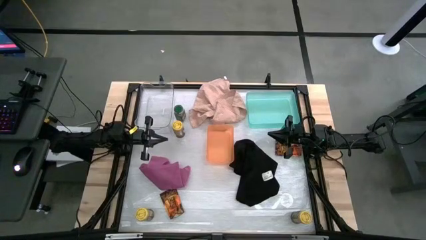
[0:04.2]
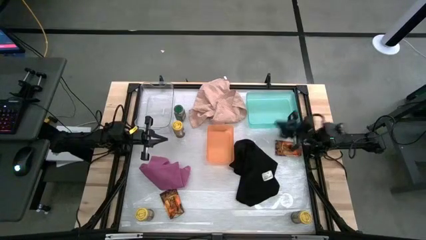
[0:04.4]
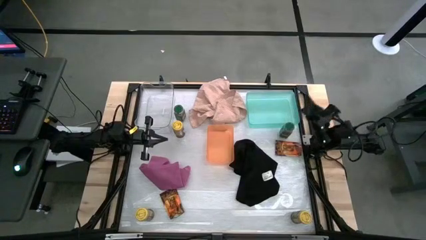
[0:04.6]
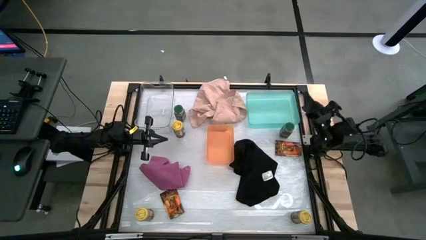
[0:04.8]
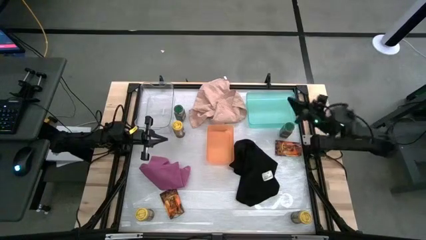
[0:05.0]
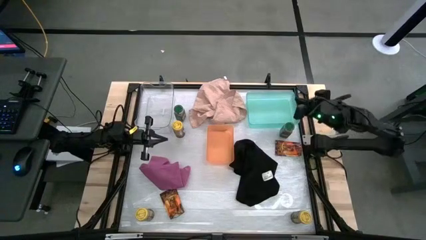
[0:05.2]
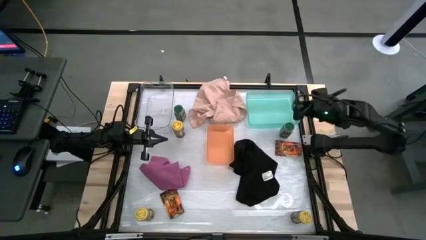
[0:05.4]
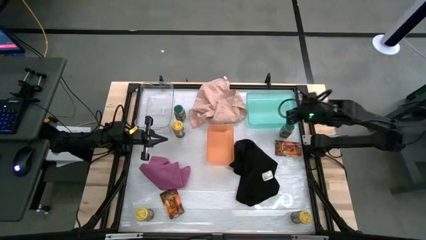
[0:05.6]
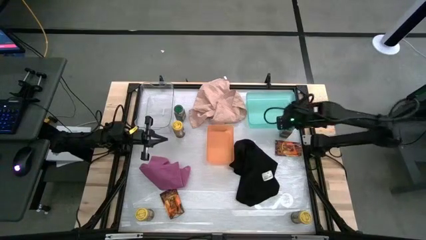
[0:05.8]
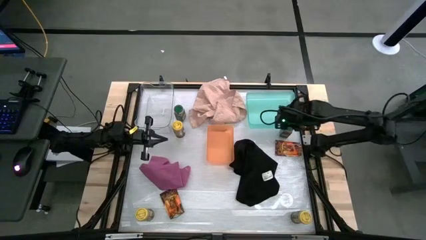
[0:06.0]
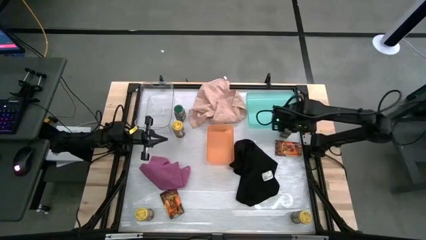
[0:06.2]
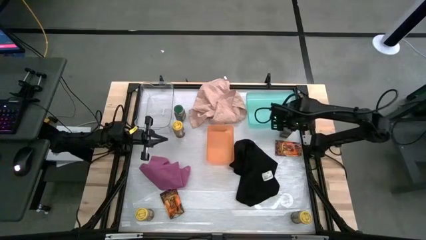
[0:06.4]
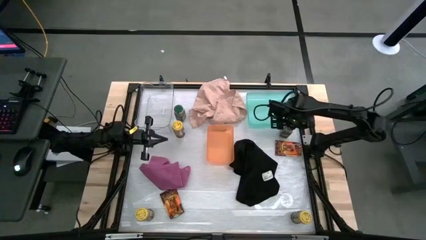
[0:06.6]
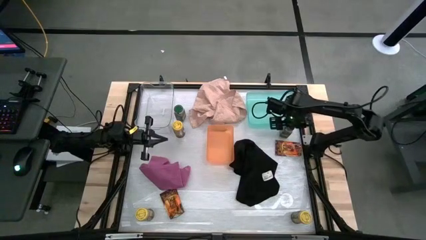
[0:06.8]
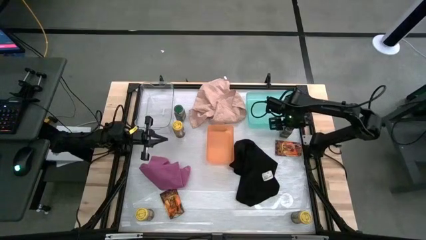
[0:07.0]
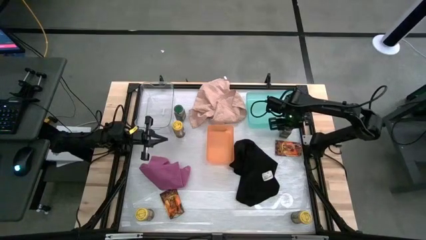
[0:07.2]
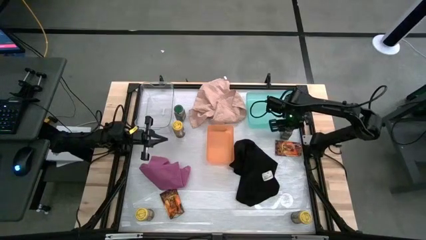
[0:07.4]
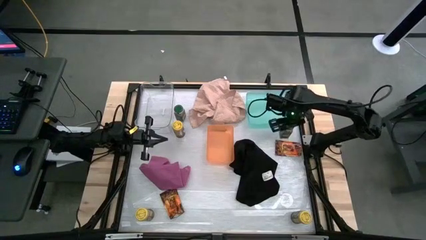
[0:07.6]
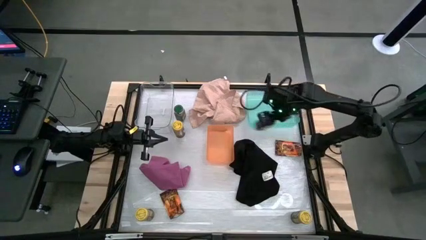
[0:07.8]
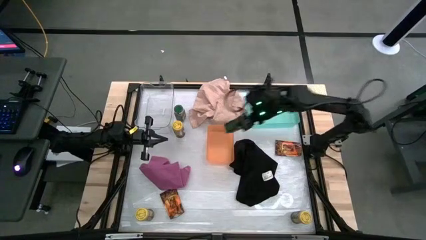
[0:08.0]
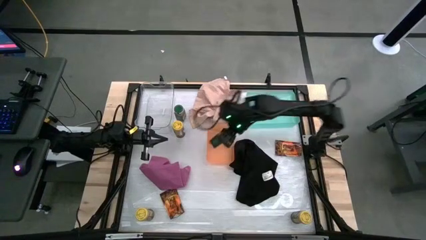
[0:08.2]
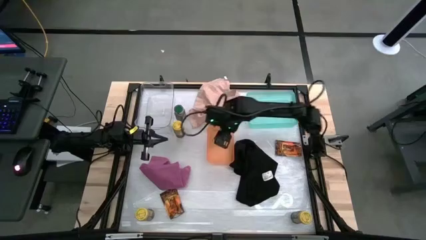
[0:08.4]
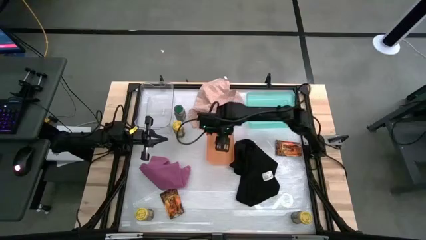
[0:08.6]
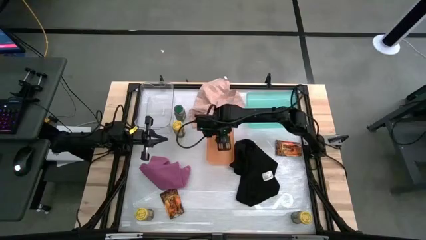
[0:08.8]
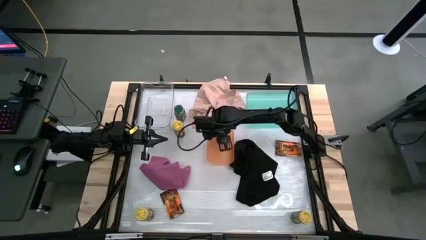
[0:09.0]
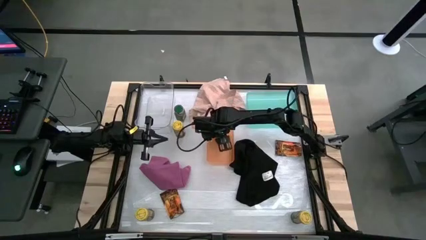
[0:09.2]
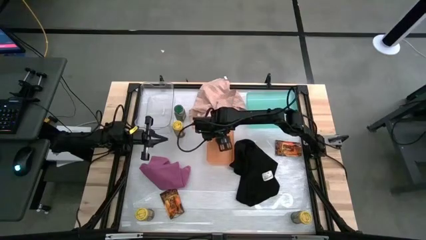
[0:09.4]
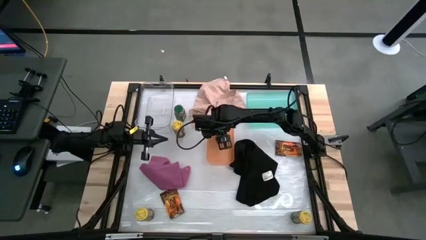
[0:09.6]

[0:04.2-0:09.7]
Task: Sort spices by type
Put the right green seasoning bottle into the orange bin

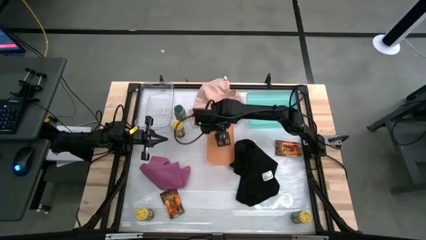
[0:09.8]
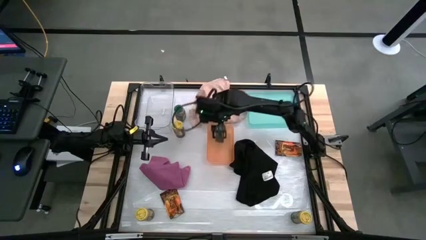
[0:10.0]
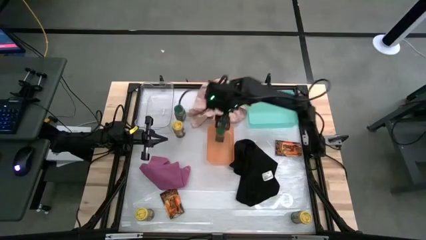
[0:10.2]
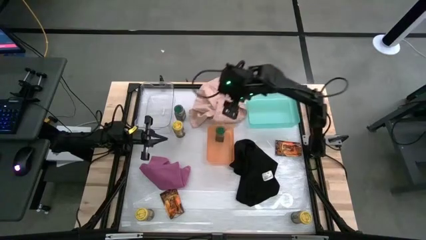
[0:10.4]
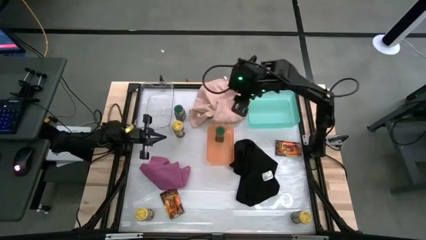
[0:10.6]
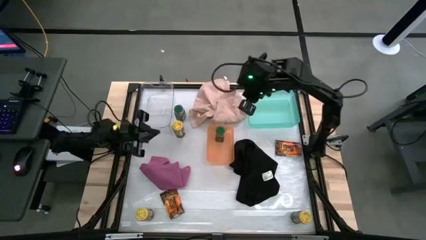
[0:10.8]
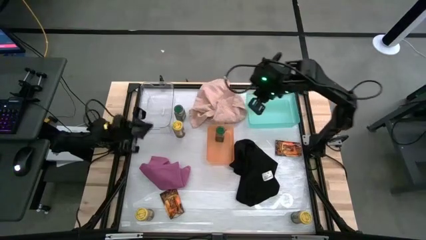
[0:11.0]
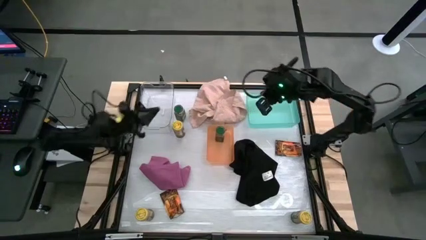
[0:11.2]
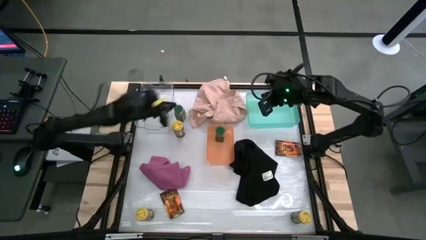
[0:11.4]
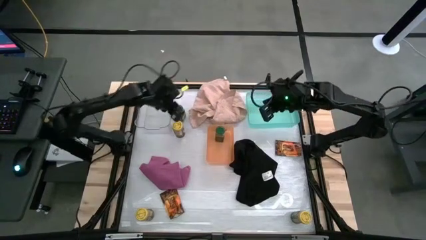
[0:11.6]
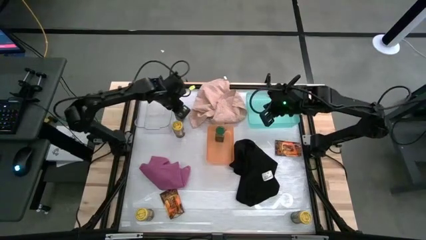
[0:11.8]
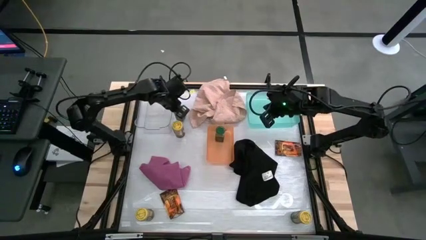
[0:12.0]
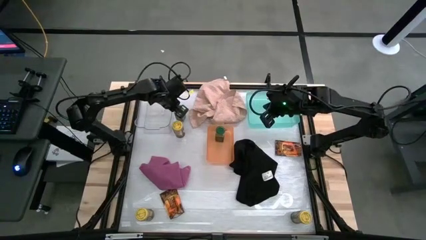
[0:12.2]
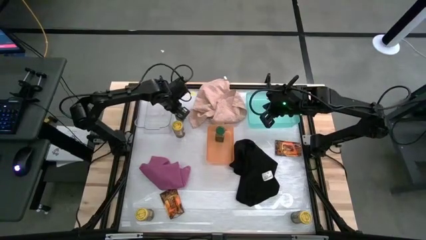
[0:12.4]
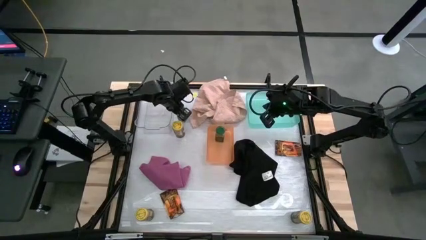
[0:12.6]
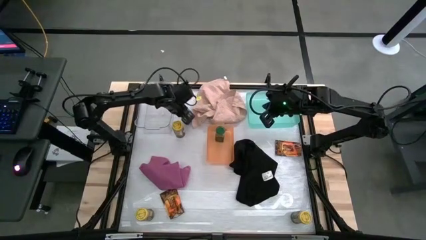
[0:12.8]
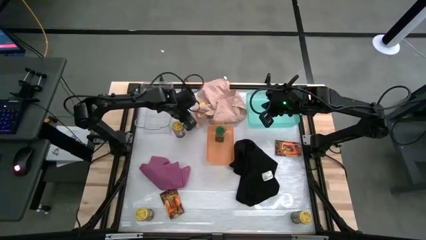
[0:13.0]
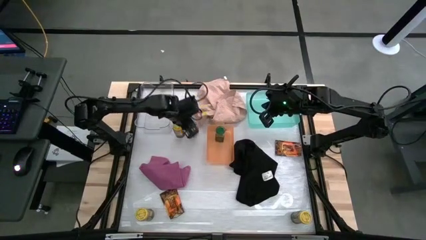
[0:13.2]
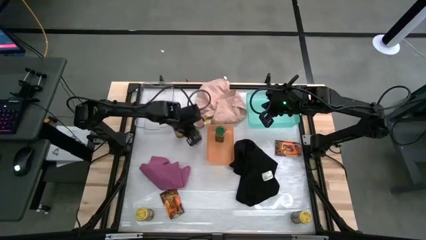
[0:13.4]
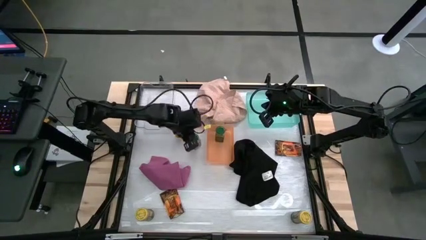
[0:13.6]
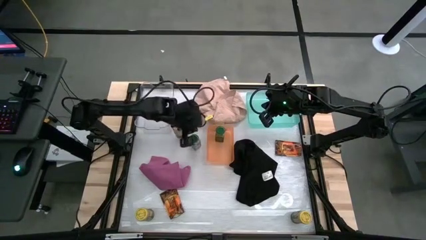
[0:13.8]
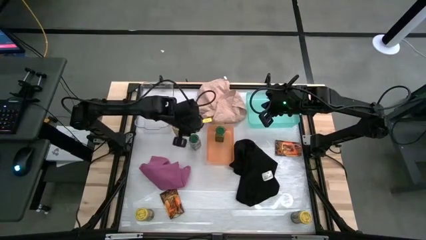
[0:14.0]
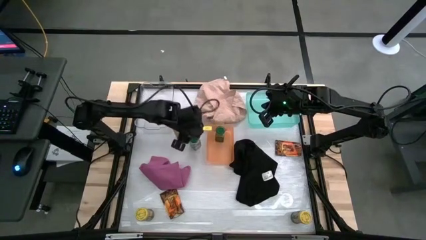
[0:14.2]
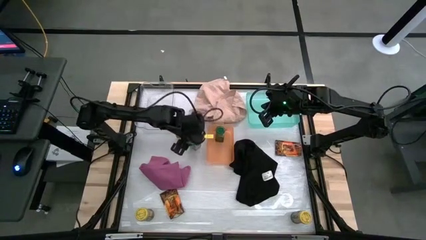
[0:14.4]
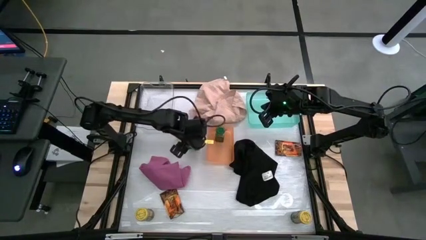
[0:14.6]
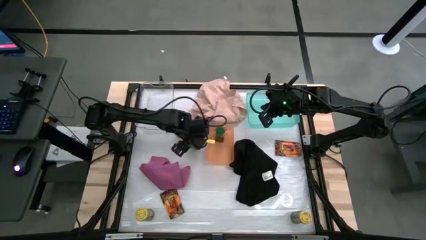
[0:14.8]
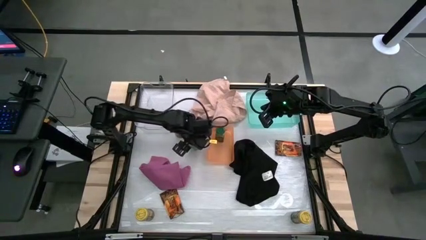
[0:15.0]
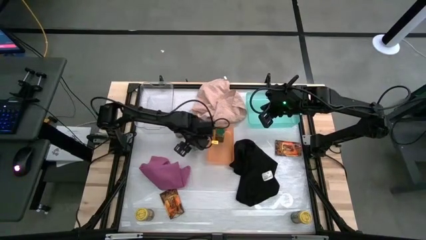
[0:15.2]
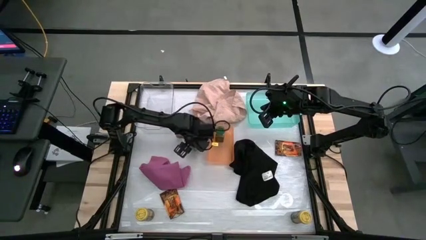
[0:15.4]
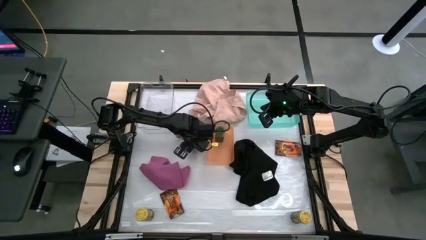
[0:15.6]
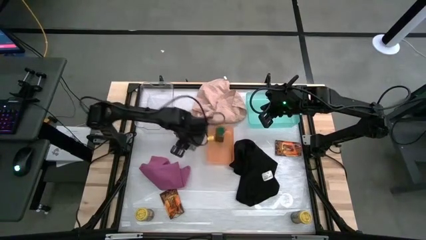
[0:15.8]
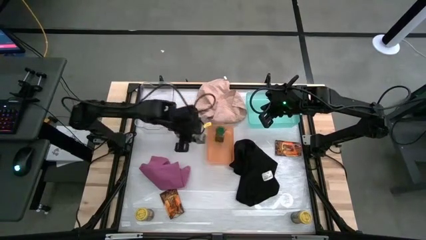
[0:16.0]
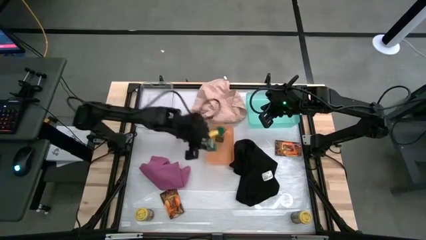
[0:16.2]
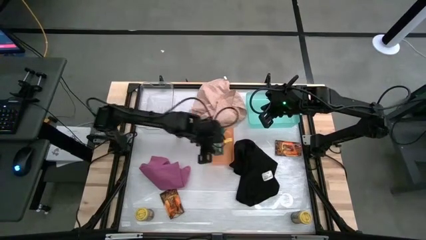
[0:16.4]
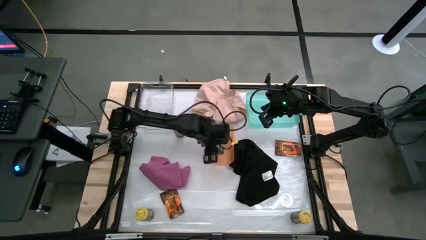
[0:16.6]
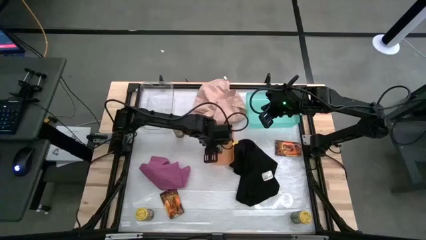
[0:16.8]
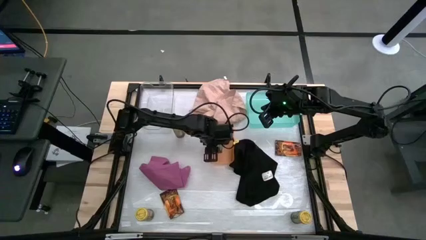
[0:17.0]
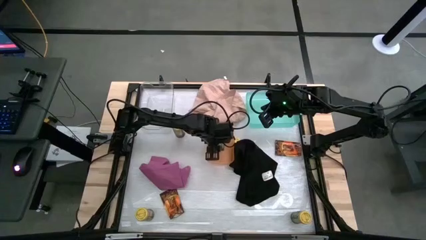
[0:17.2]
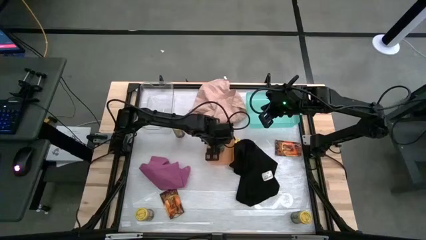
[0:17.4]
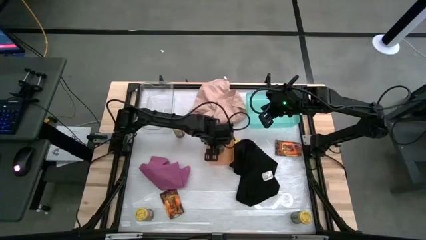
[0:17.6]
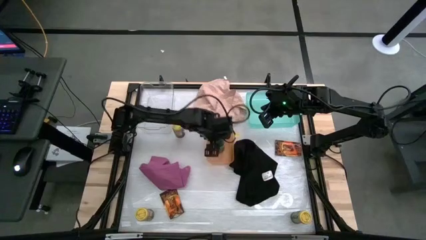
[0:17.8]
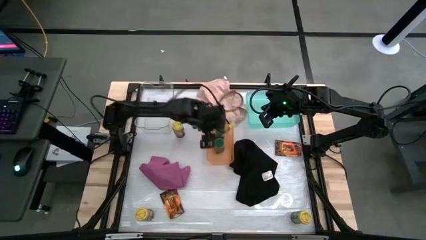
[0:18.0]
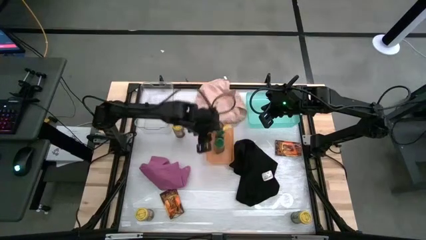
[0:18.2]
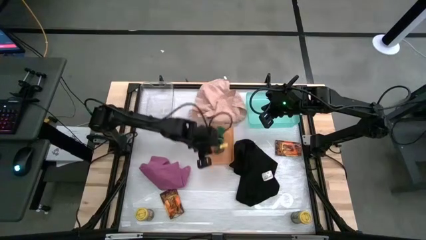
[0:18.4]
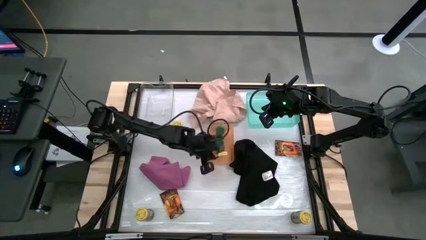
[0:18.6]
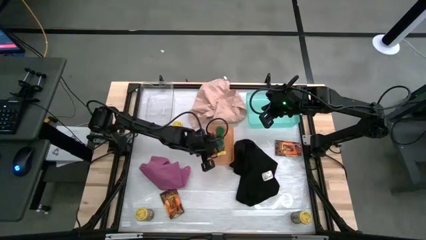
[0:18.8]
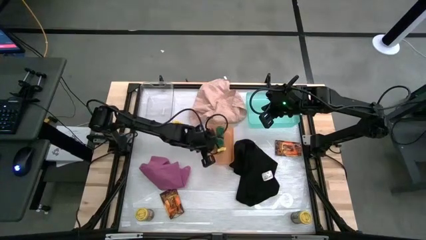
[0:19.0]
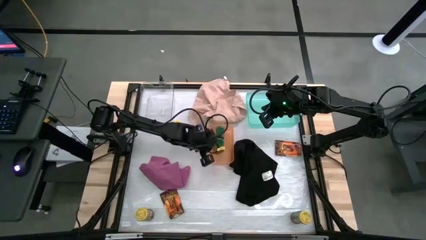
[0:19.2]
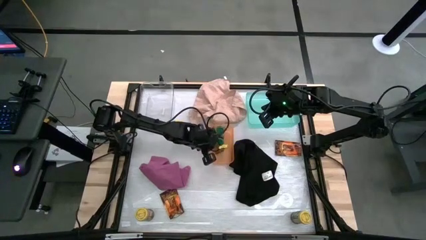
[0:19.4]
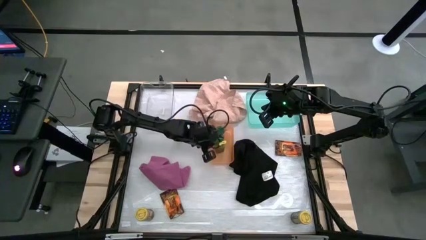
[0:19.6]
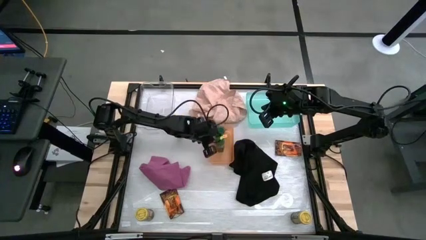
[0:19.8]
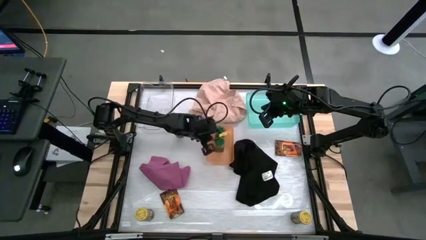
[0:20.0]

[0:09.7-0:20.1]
Put the green seasoning bottle into the orange bin
